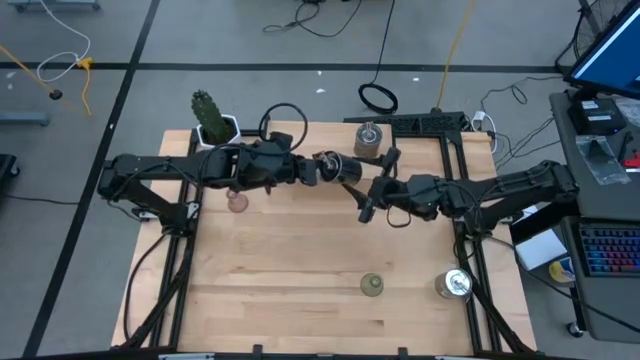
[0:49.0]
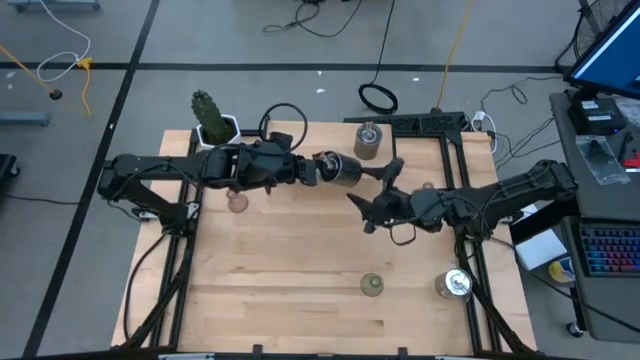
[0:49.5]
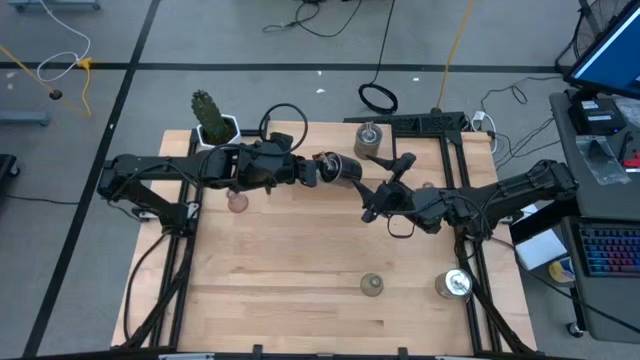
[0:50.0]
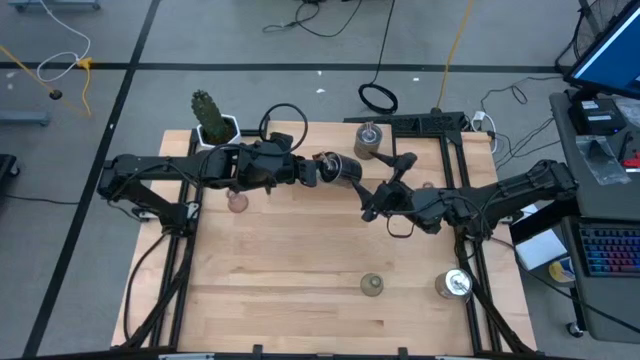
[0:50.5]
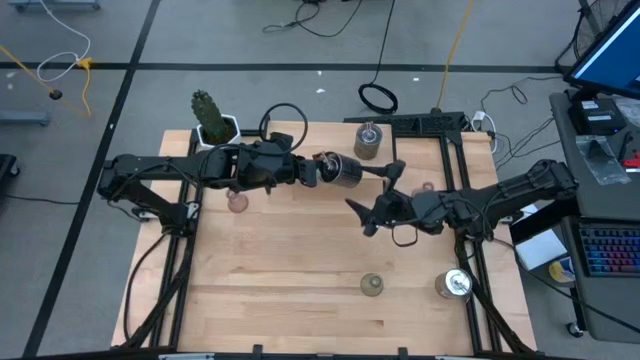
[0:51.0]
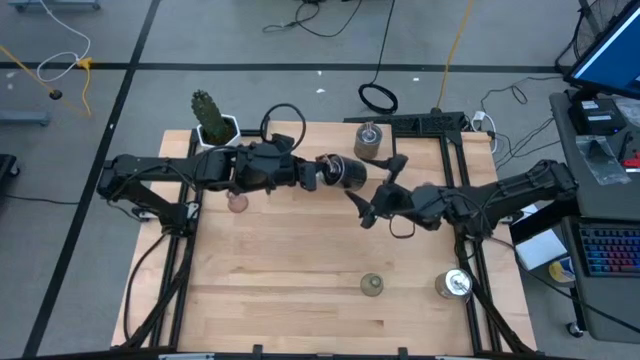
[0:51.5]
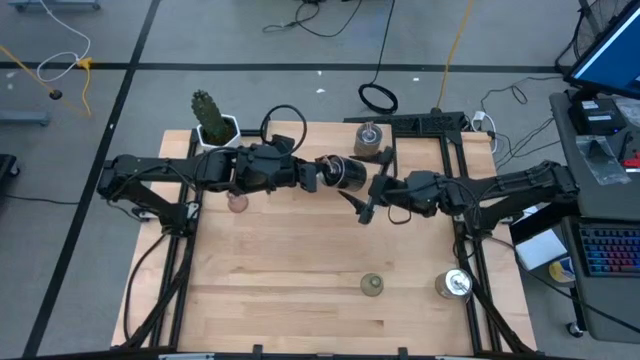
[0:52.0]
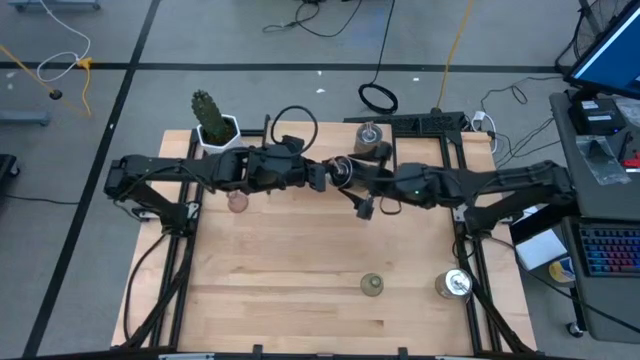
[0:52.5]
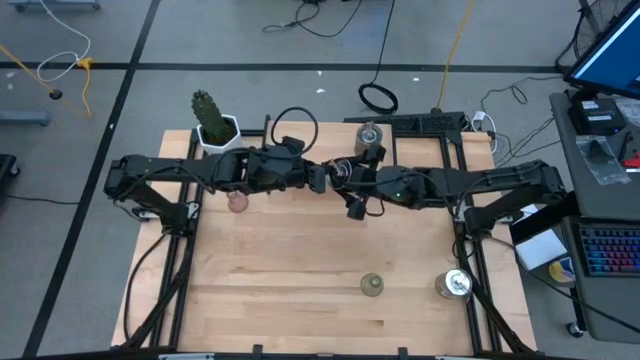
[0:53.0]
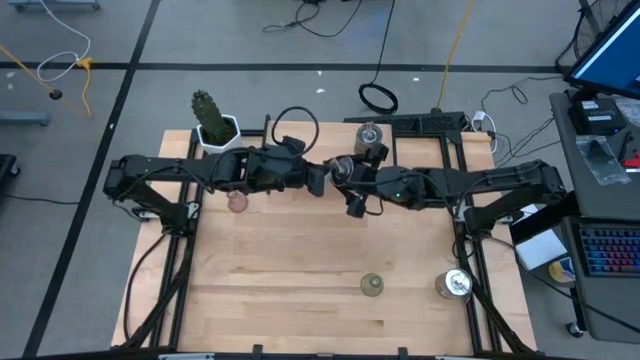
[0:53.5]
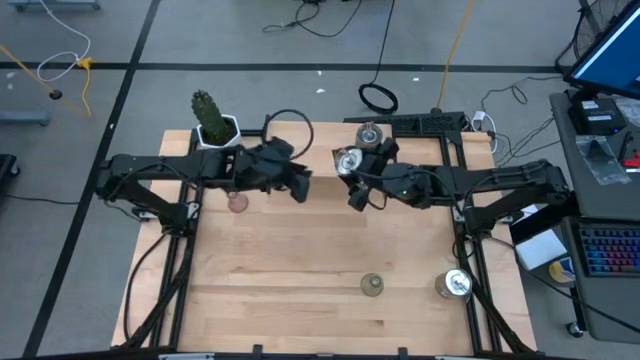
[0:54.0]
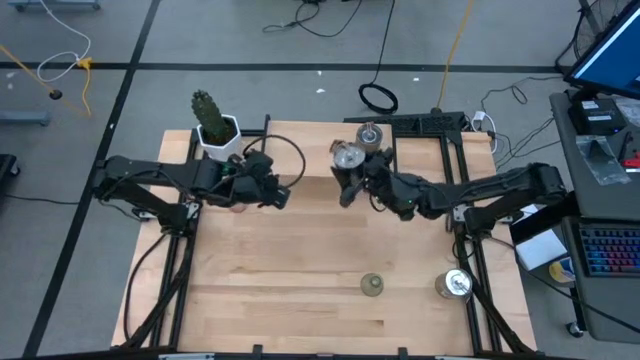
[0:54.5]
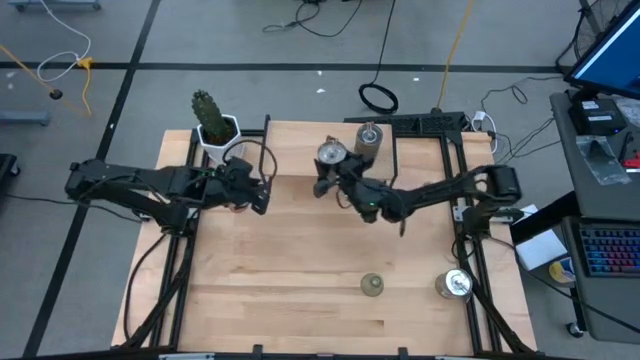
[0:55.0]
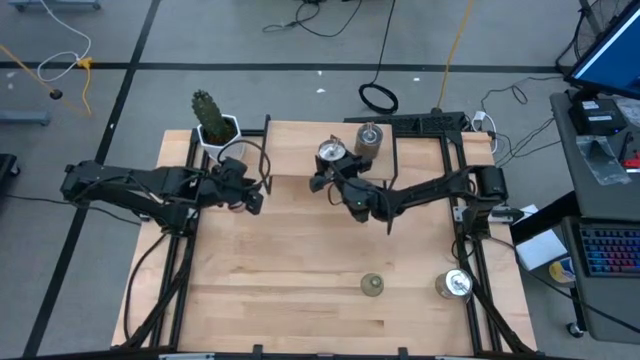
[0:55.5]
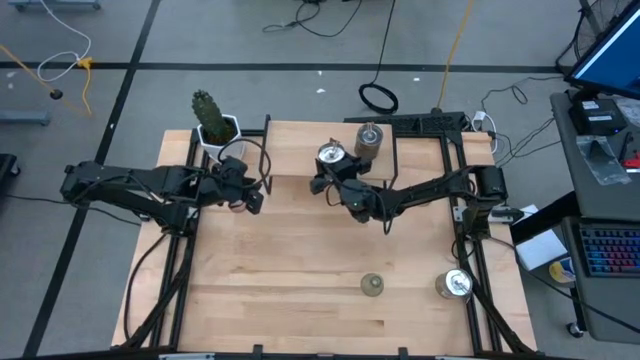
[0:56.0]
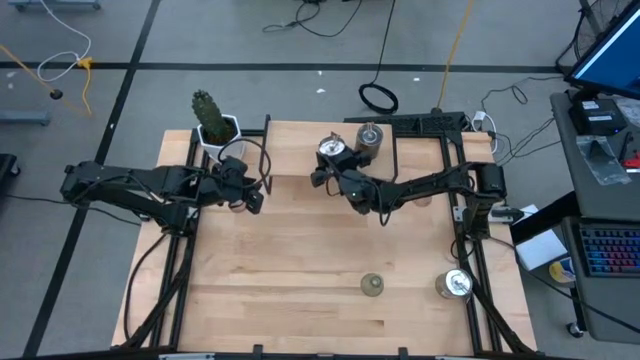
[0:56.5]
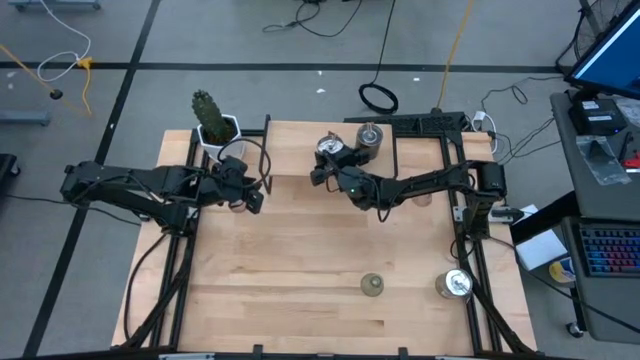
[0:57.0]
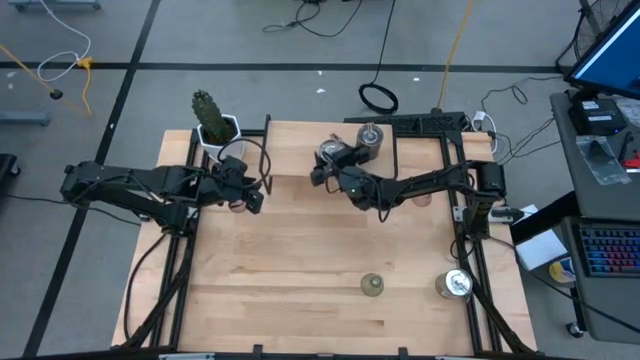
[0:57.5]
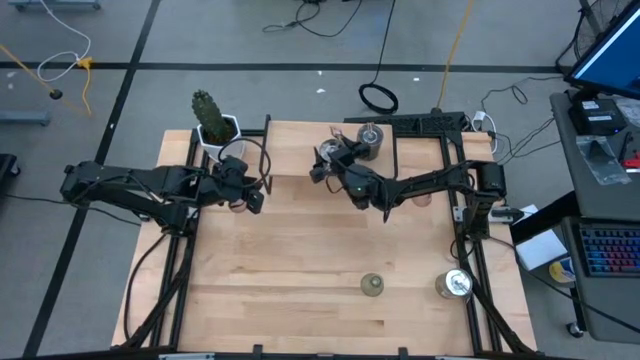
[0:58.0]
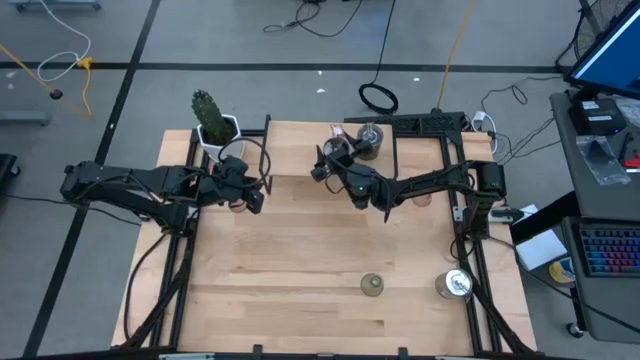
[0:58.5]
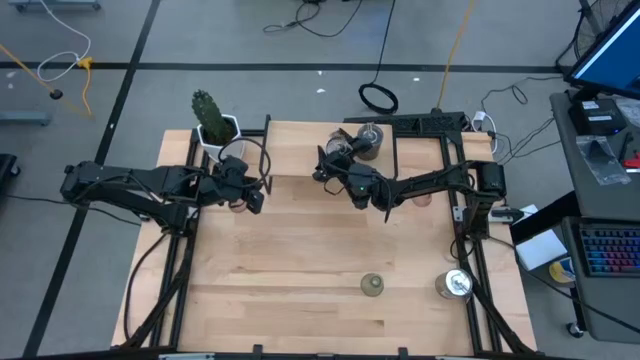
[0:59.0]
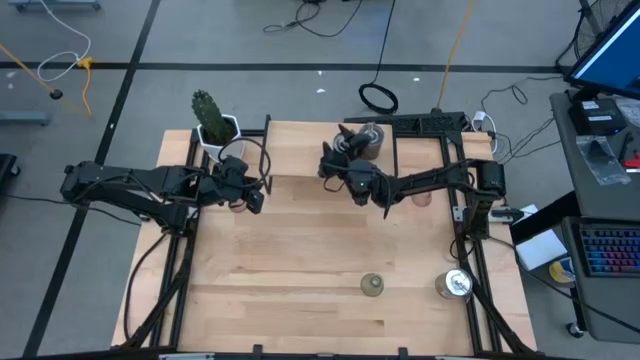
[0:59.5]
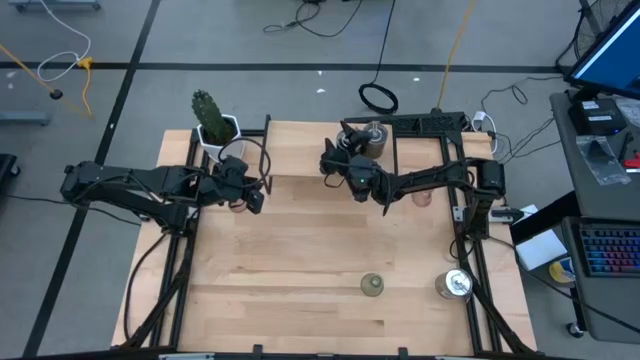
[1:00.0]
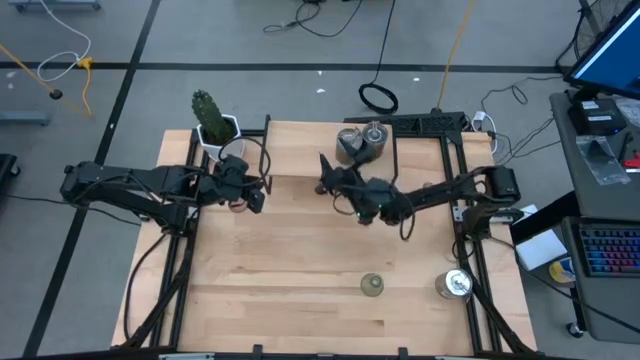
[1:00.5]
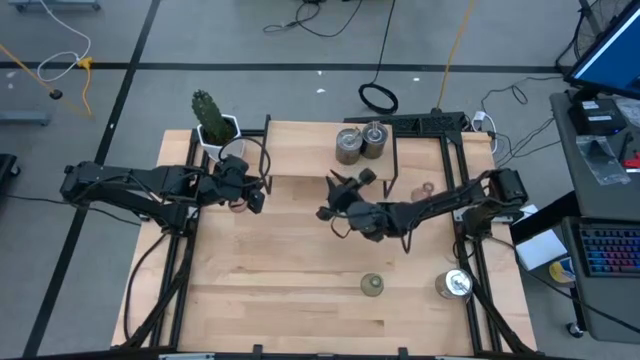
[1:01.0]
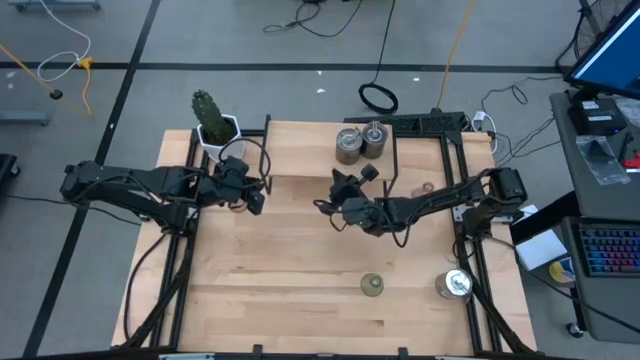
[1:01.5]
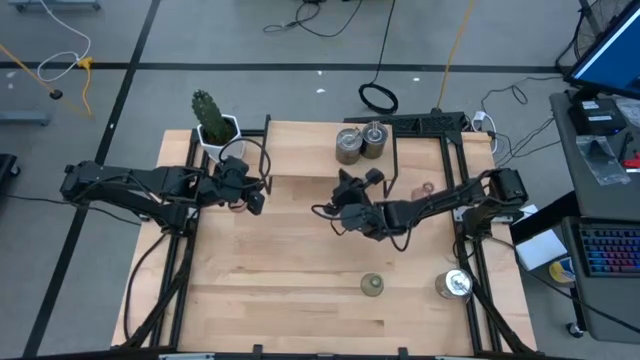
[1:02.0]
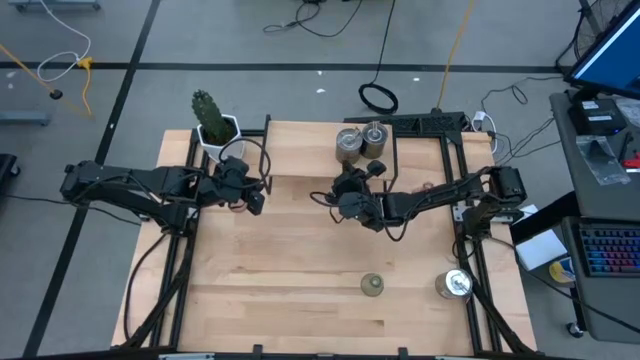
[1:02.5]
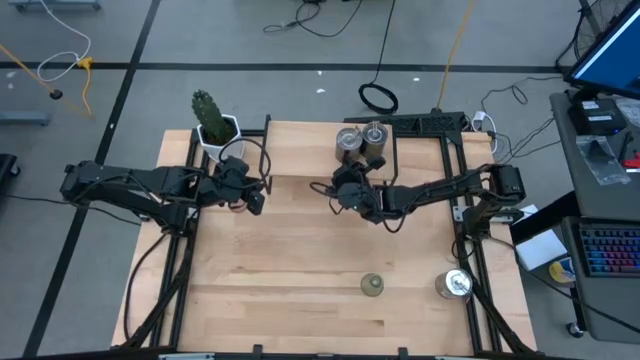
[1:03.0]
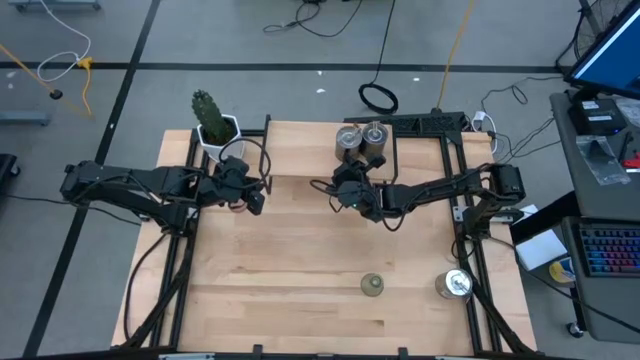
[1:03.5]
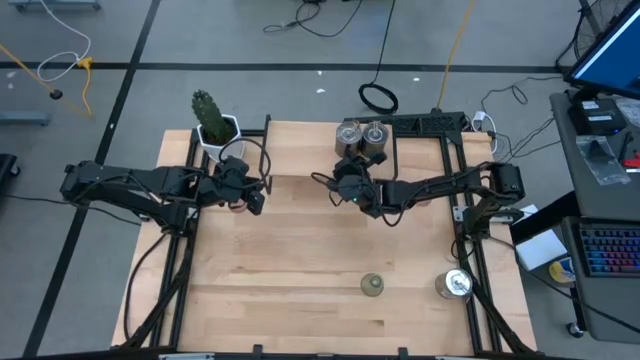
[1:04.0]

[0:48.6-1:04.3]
Task: Pick & Place candle stick holders
Put the top brown scented candle on the shelf

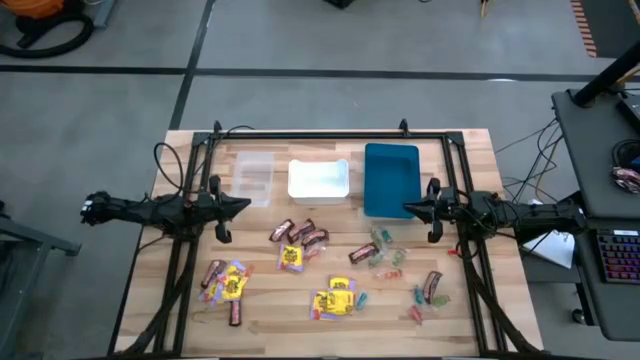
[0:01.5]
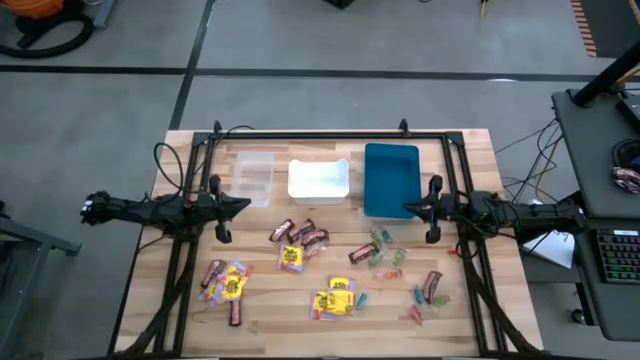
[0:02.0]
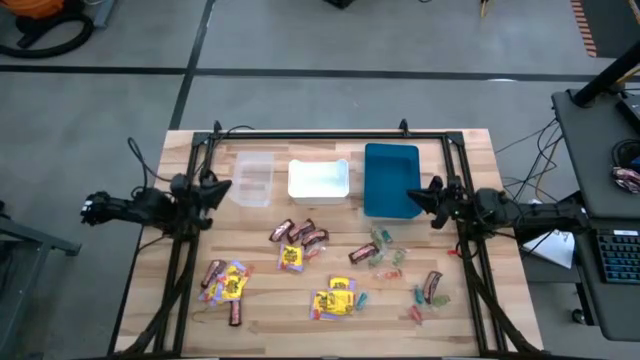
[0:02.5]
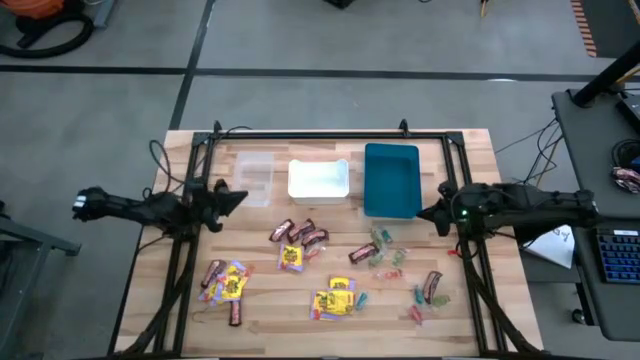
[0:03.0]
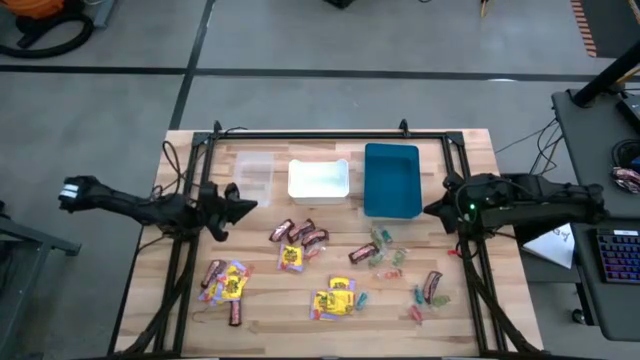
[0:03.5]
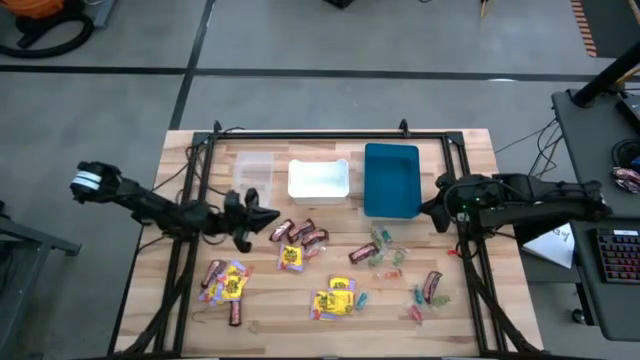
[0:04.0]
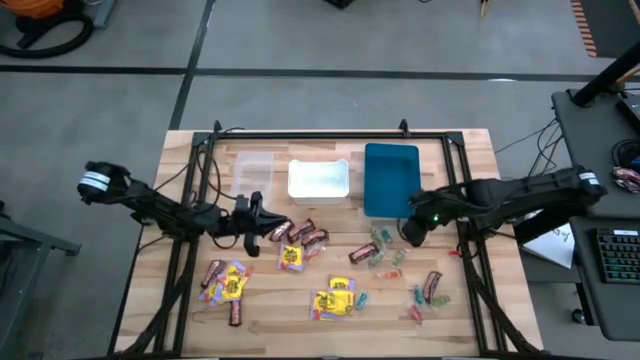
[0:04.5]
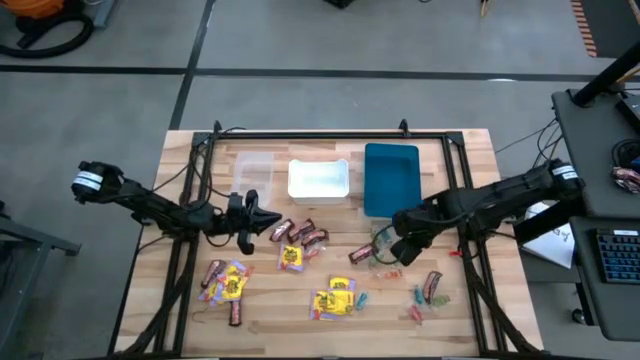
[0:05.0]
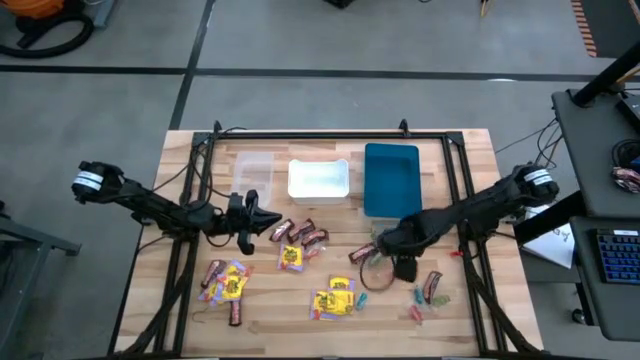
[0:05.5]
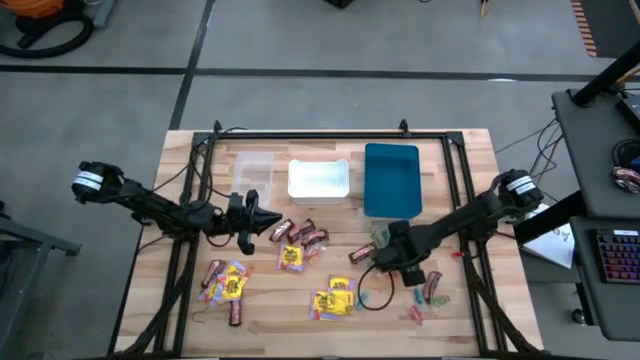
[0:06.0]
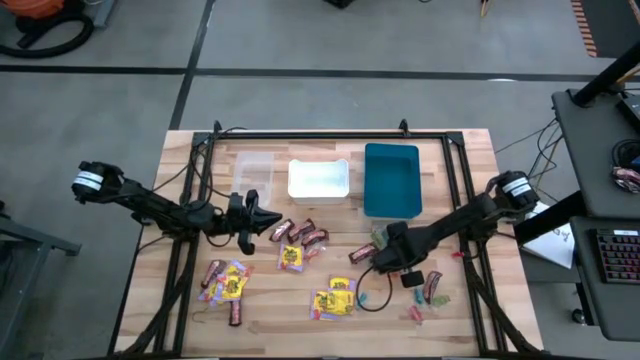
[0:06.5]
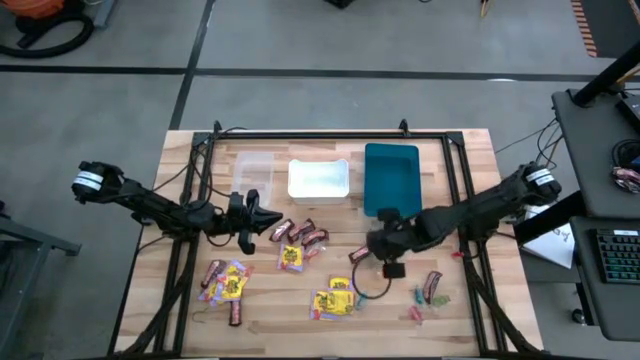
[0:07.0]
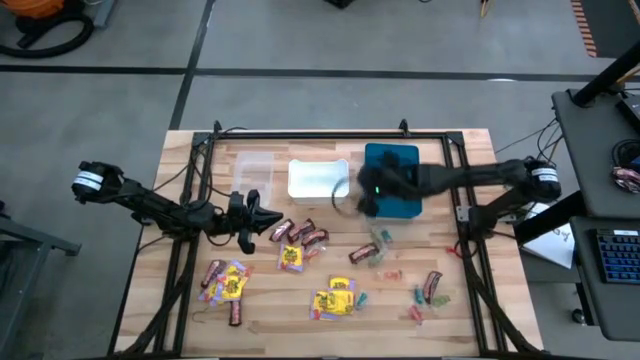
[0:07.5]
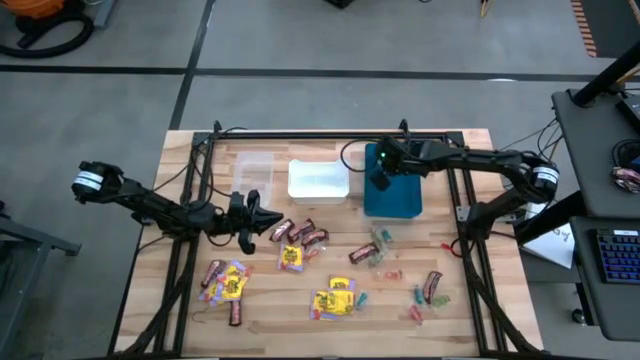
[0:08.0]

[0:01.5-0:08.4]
Task: Sort candy
Put the green candy into the blue bin
